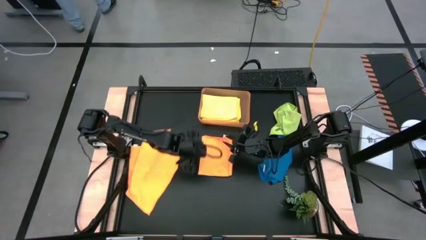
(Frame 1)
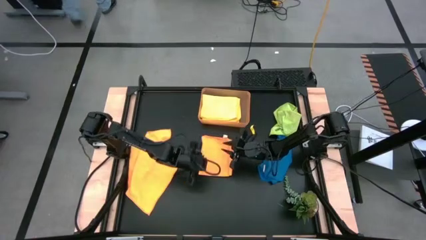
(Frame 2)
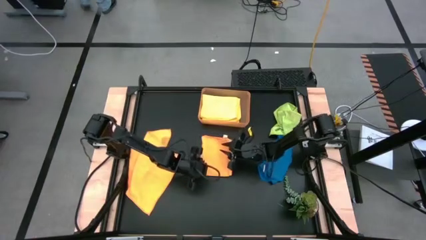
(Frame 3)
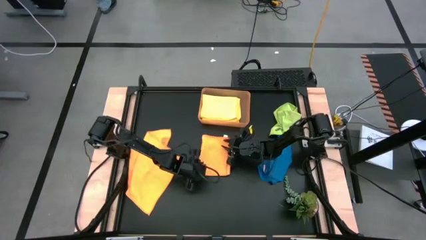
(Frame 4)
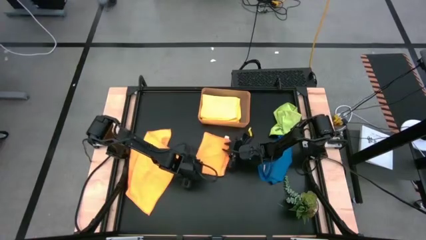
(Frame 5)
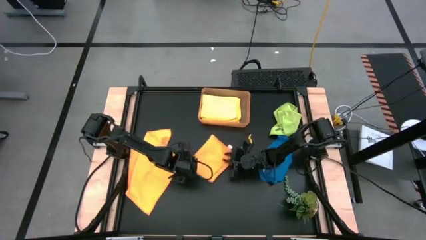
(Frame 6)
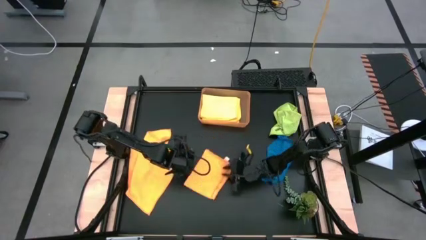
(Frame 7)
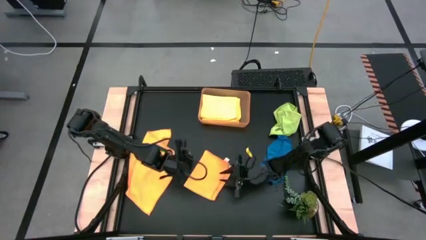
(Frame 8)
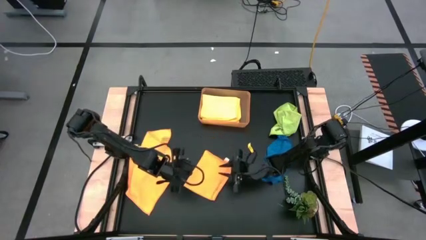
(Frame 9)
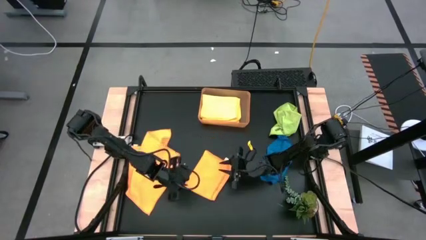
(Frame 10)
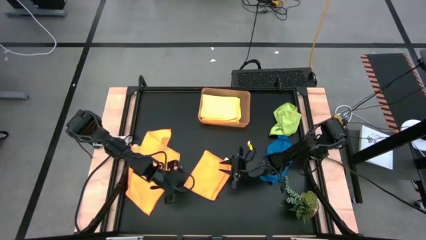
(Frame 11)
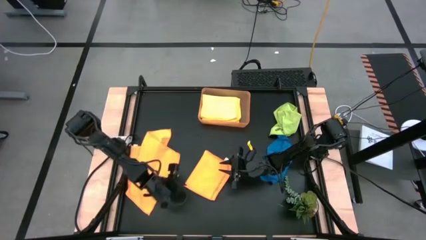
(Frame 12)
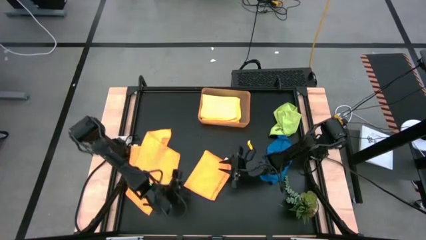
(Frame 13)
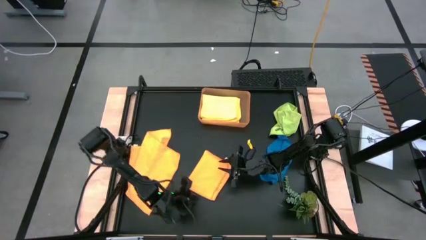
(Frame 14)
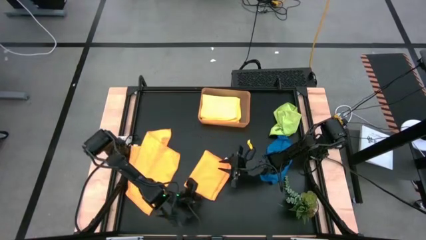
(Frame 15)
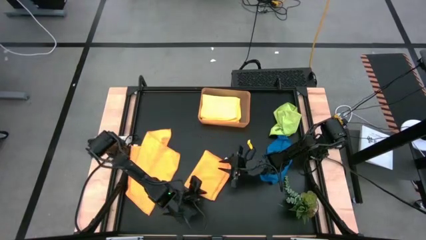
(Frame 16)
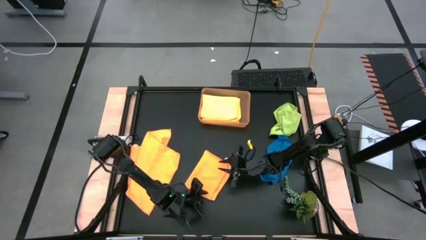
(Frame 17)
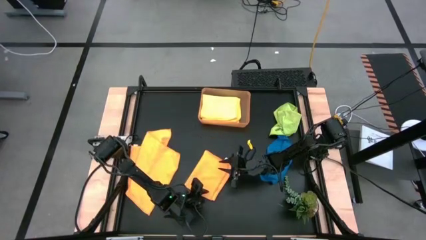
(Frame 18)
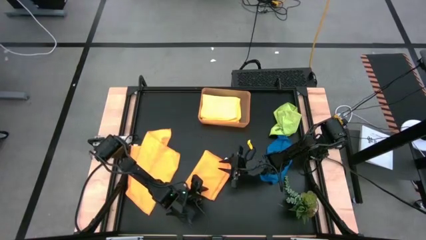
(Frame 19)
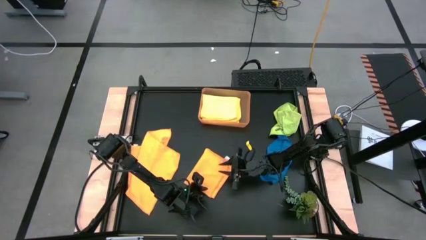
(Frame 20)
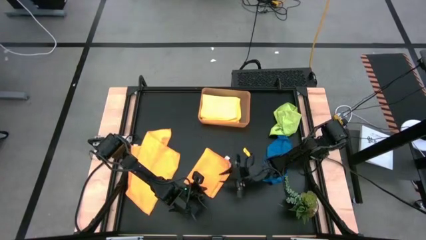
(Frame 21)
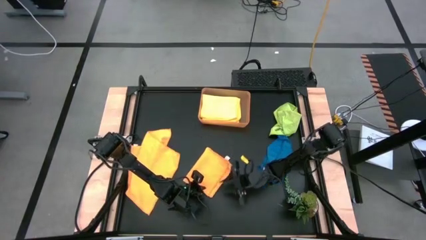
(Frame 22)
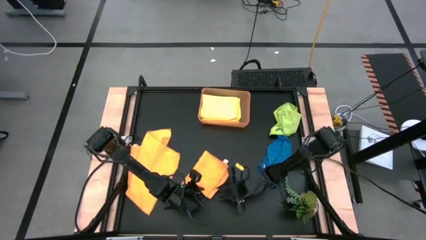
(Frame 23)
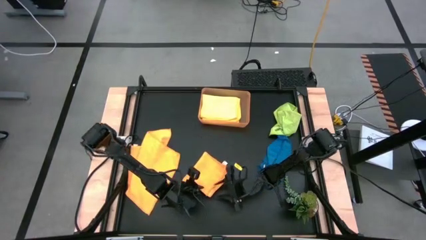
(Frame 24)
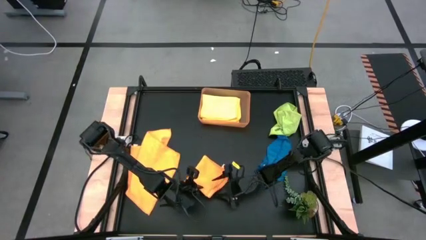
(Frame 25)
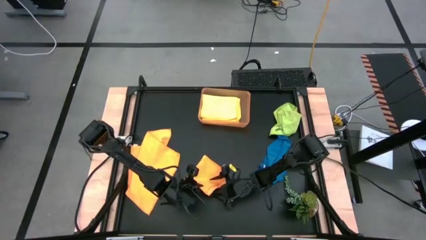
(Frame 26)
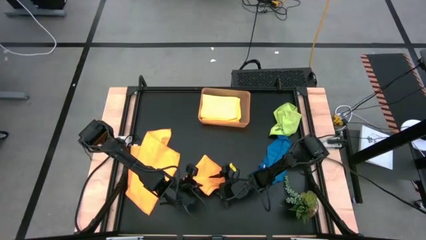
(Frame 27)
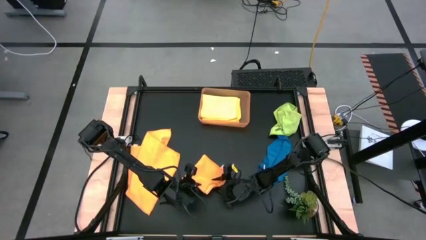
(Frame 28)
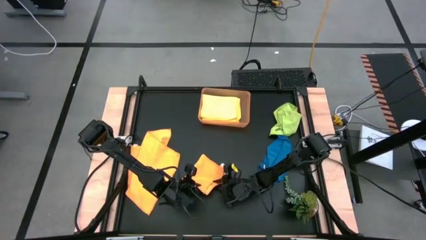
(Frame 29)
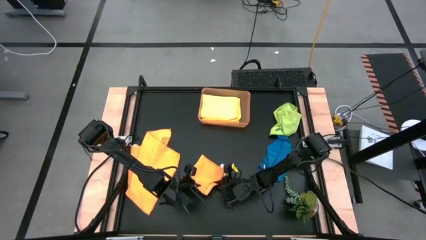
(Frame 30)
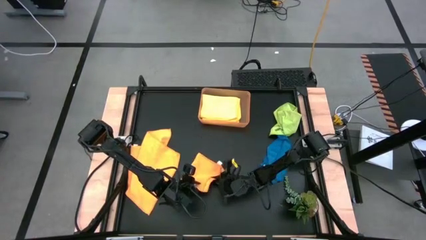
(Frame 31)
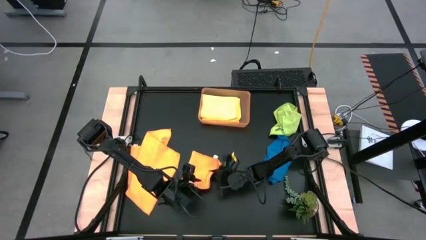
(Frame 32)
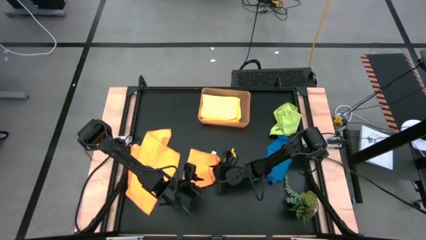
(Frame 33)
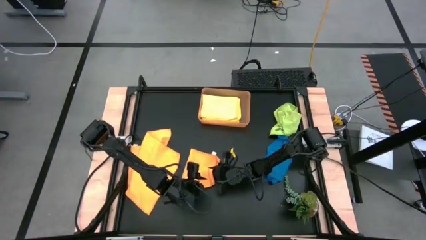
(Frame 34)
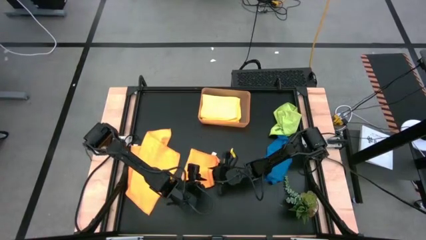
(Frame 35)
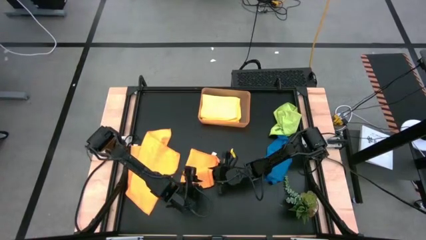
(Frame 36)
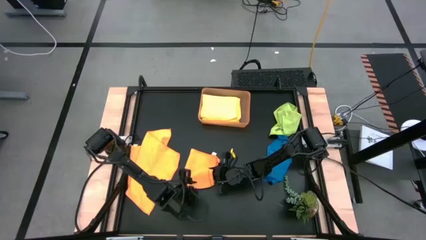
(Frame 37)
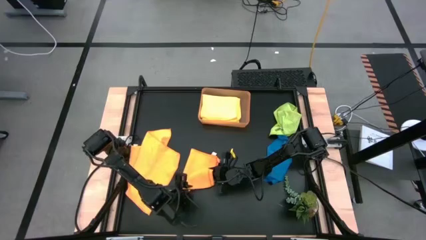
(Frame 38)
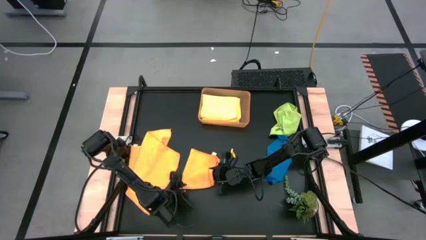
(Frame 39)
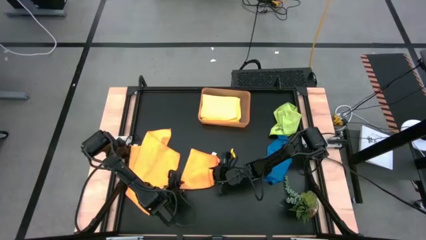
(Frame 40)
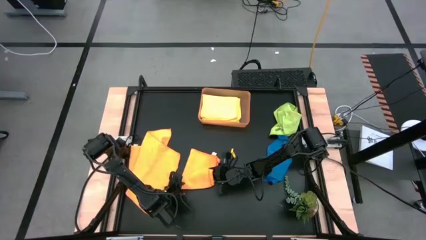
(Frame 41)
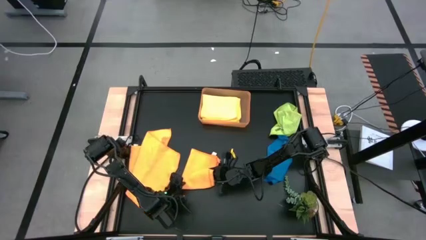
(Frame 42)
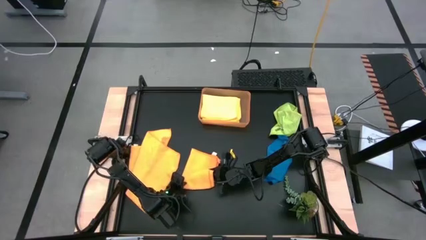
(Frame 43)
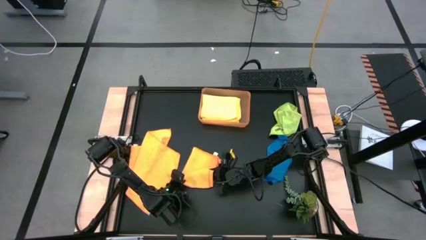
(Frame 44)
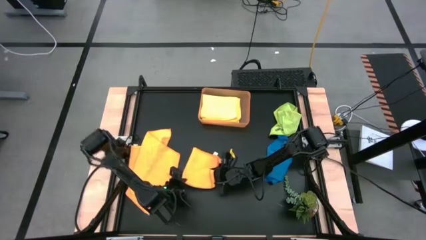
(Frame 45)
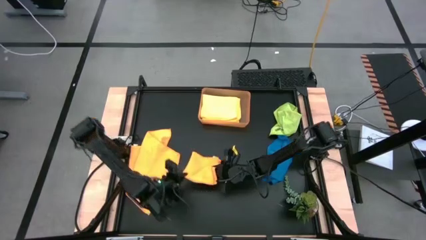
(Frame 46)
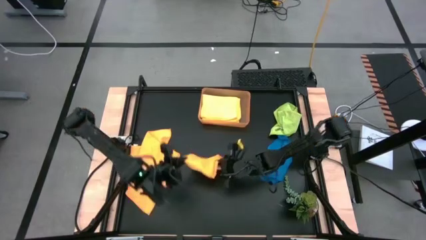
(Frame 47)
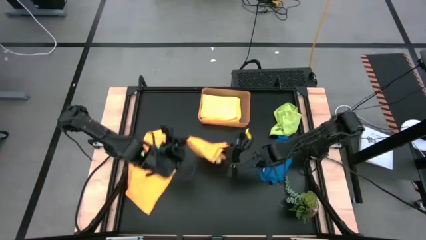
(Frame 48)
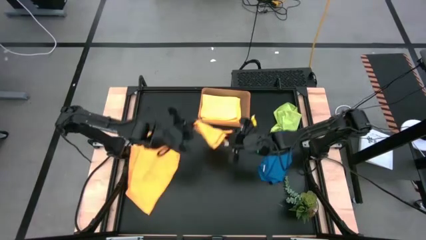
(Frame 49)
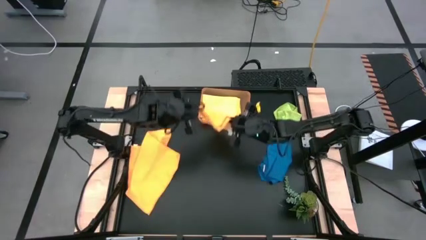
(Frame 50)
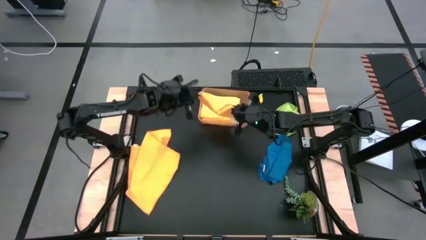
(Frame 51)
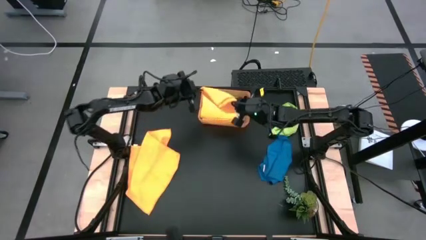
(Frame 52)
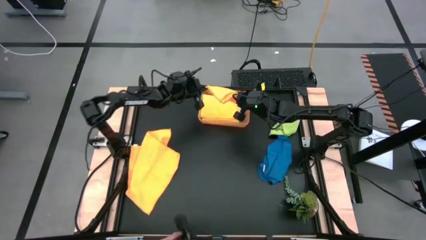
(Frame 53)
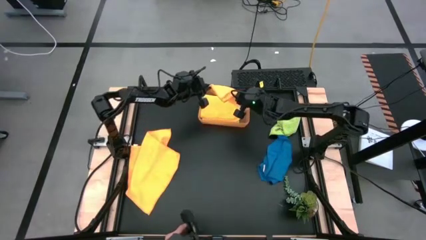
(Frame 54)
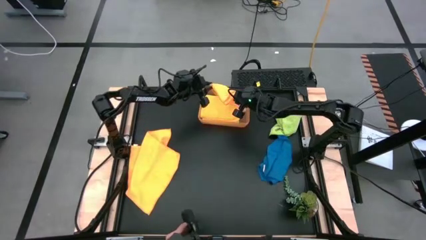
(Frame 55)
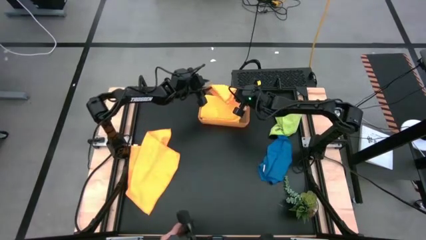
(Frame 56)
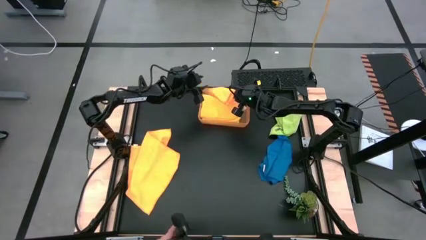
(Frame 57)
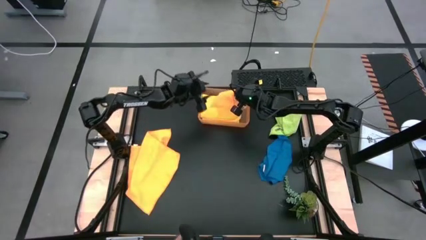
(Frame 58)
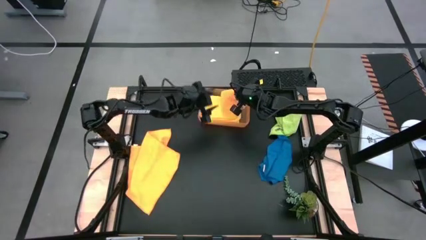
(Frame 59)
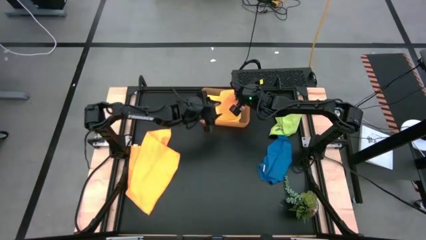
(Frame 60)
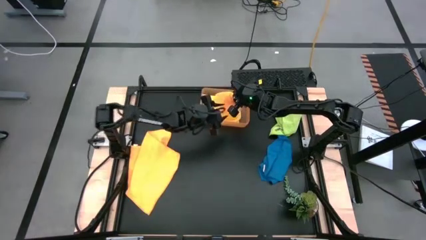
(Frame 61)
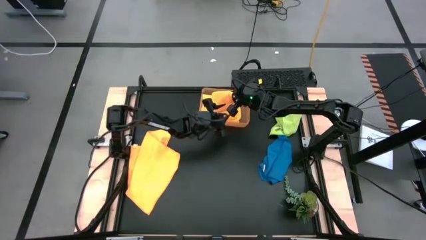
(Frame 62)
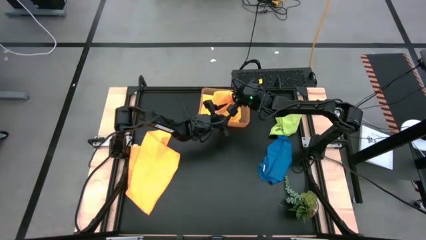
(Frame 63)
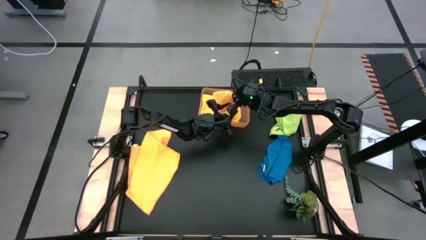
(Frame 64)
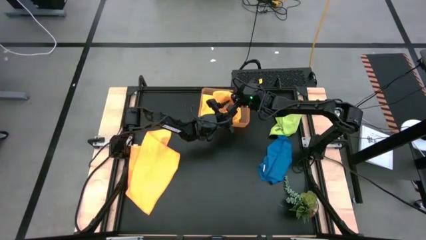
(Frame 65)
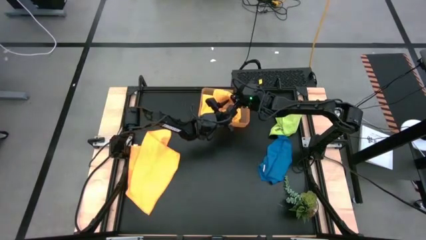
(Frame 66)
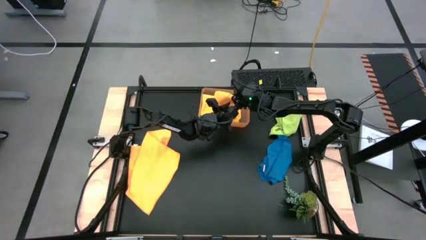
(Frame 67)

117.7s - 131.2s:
Task: Fold microfiber towels
Put the orange towel in the orange bin

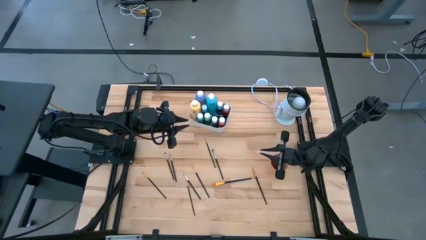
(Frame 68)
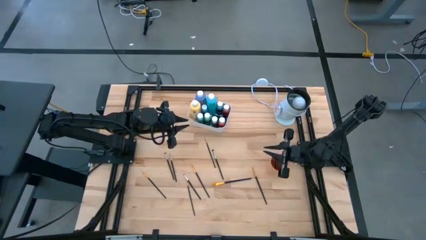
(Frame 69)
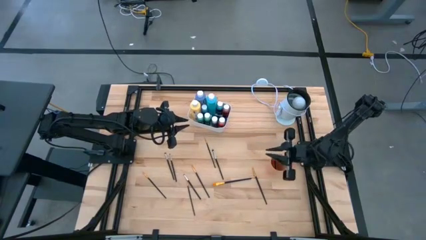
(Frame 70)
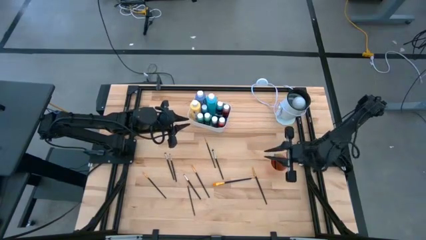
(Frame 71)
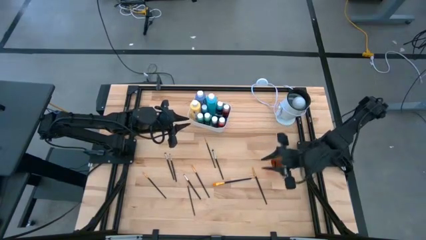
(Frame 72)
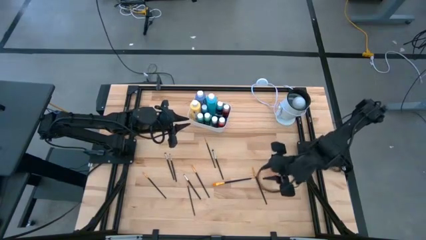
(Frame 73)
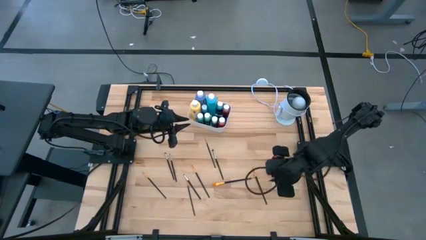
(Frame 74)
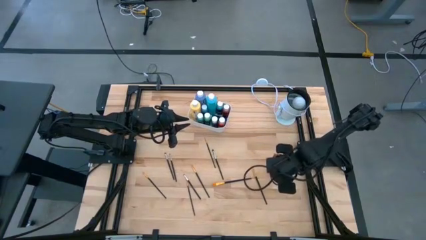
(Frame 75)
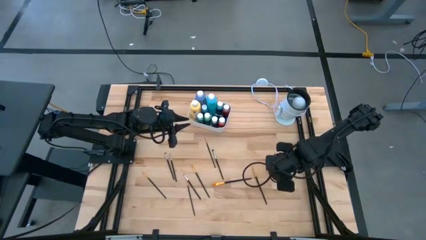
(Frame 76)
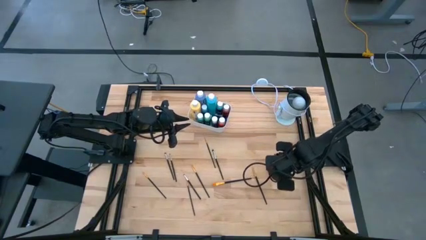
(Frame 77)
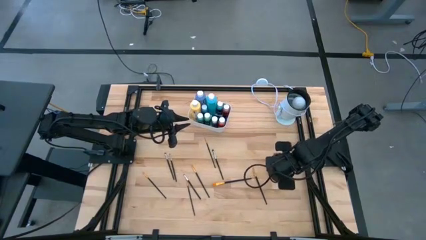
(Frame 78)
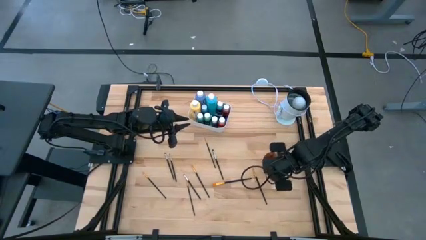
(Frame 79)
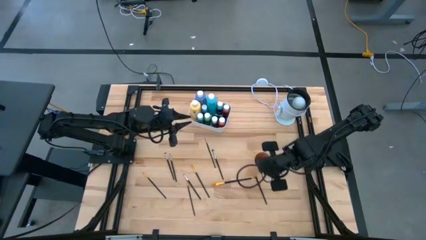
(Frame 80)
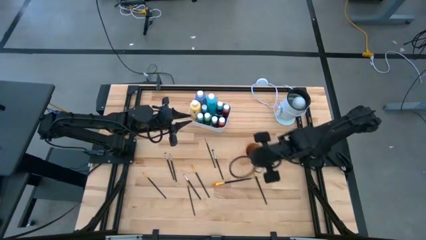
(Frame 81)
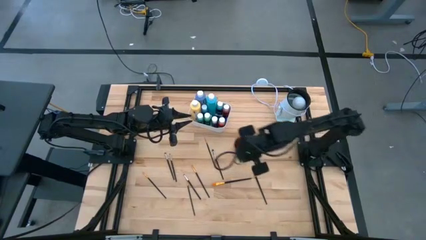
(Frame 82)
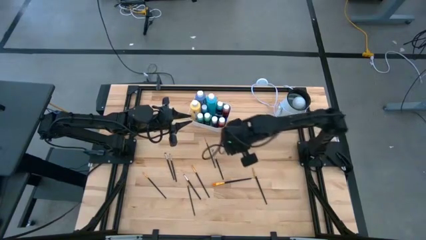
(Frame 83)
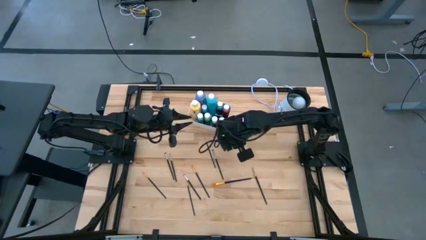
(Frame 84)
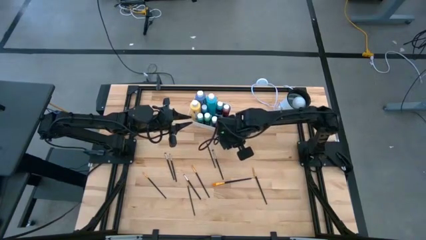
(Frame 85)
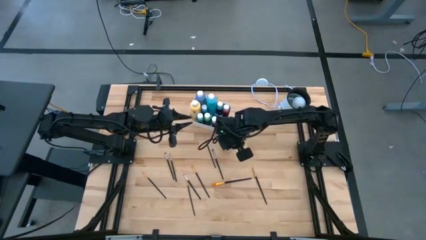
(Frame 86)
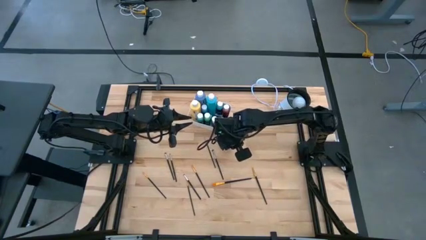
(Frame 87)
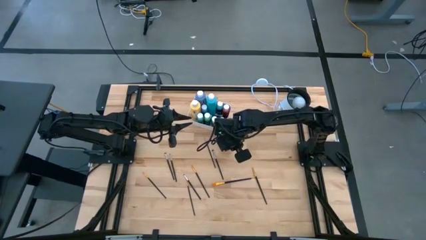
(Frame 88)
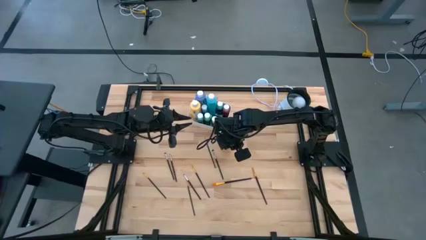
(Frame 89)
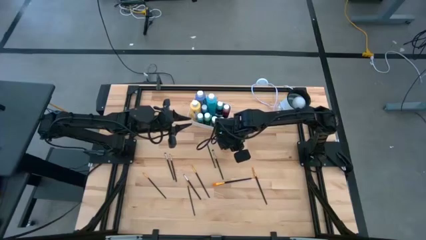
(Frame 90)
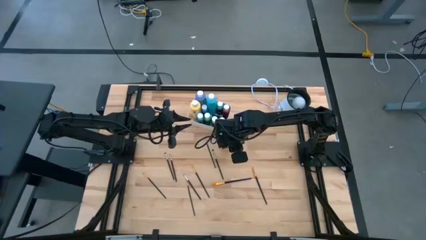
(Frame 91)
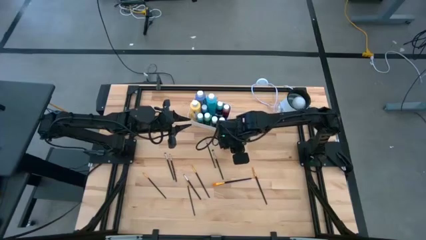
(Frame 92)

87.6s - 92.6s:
Task: Pick & Place Paint Supplies
Move the orange cup to the middle of the table
